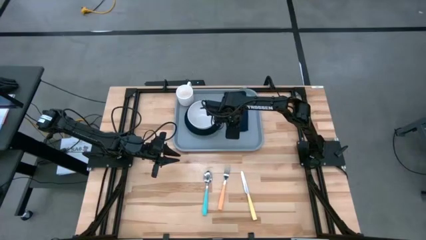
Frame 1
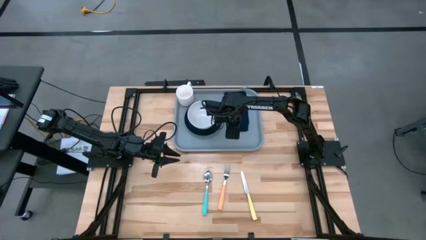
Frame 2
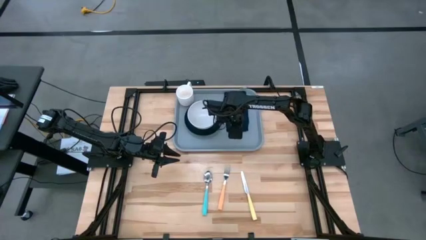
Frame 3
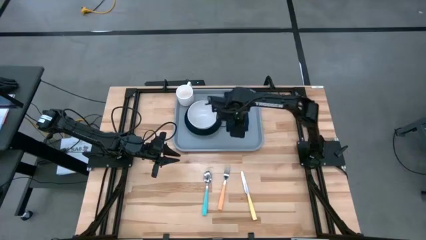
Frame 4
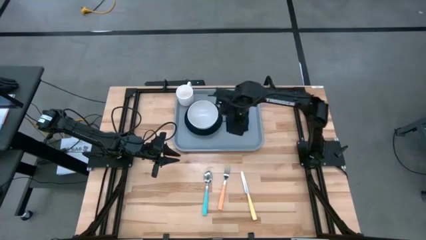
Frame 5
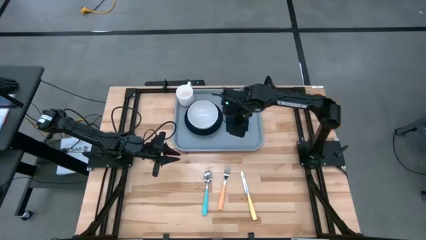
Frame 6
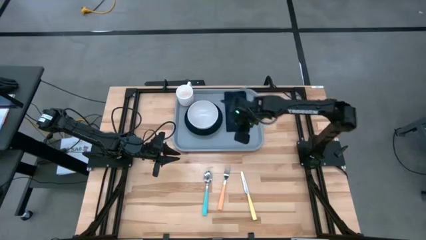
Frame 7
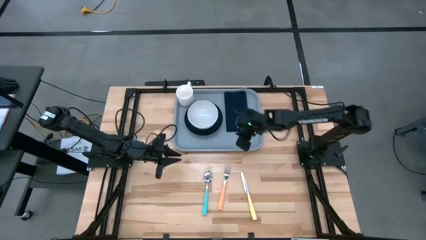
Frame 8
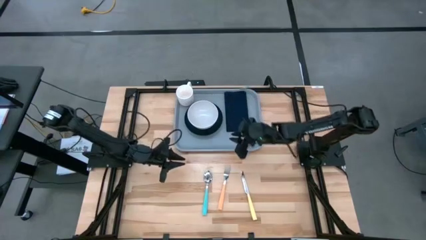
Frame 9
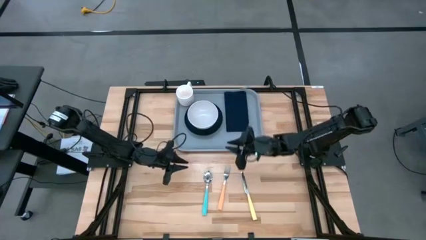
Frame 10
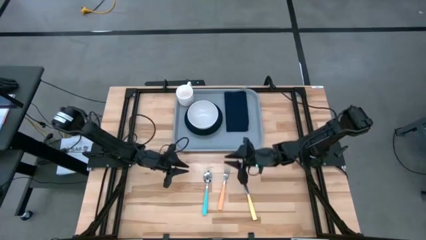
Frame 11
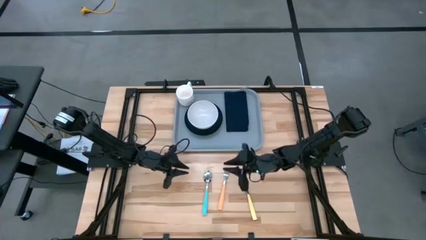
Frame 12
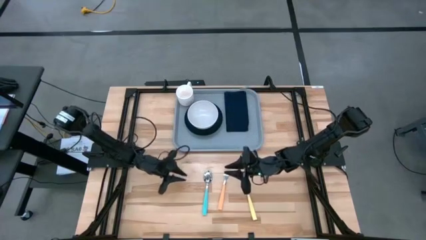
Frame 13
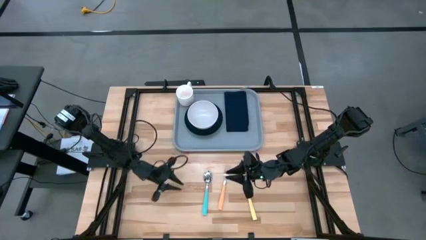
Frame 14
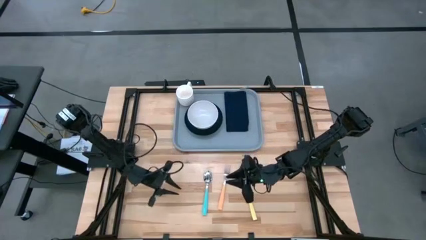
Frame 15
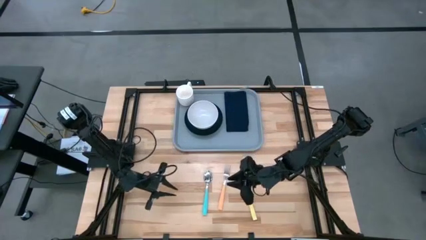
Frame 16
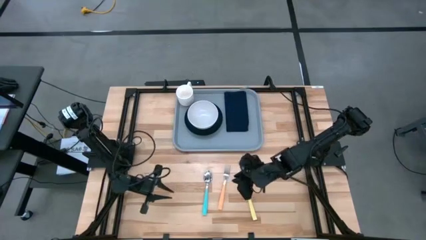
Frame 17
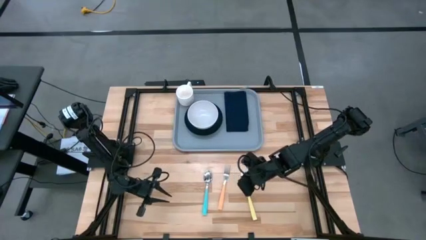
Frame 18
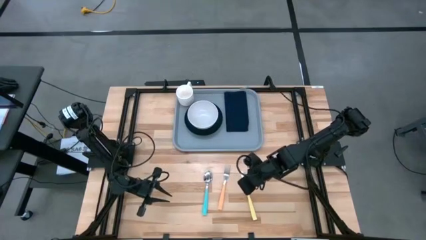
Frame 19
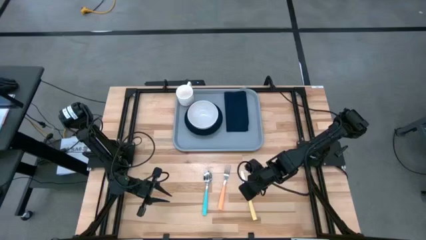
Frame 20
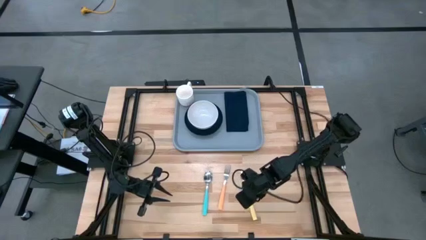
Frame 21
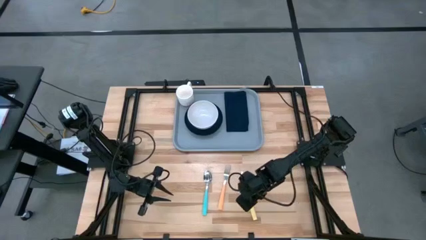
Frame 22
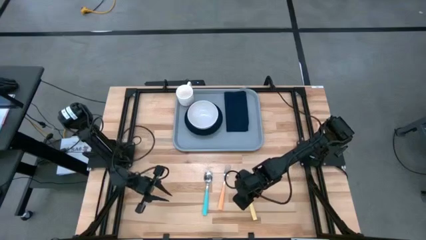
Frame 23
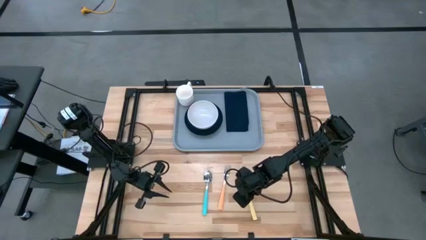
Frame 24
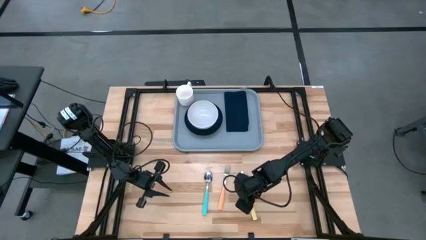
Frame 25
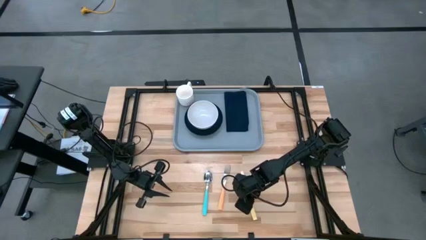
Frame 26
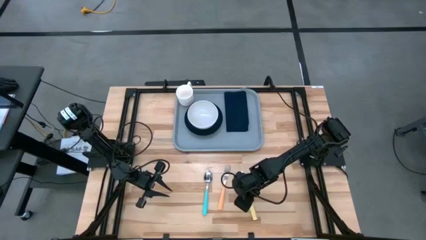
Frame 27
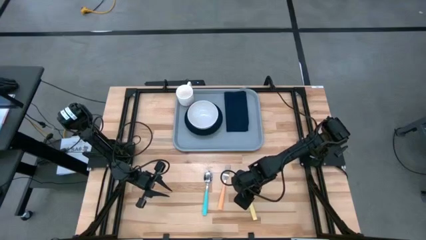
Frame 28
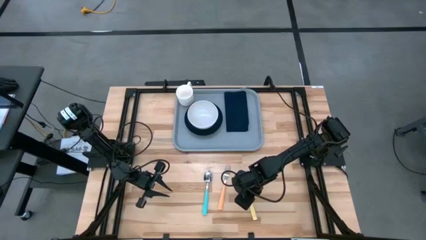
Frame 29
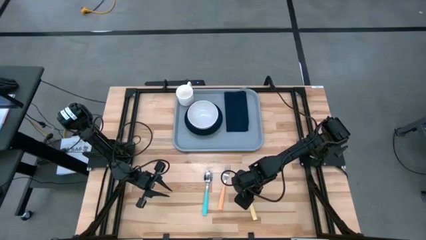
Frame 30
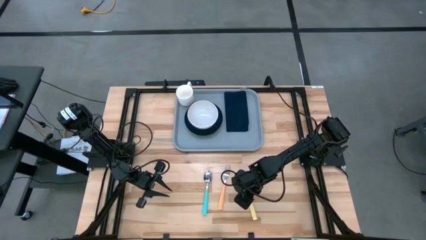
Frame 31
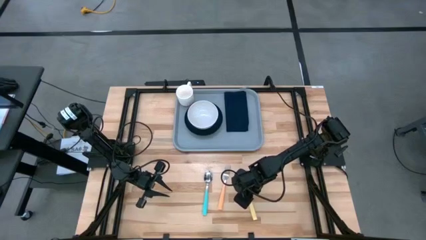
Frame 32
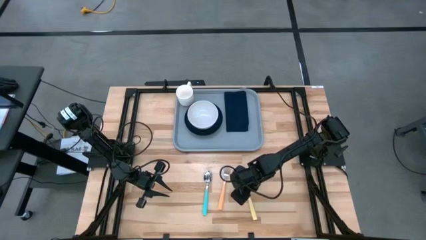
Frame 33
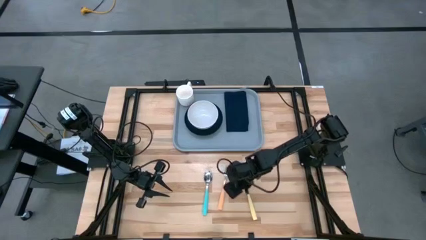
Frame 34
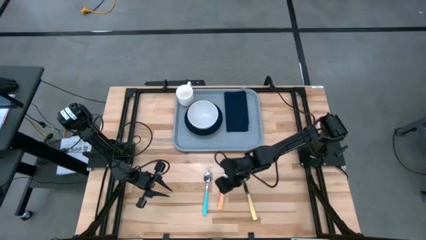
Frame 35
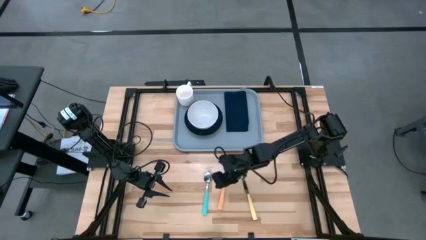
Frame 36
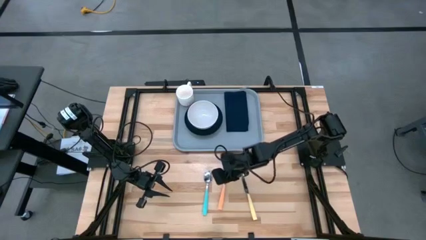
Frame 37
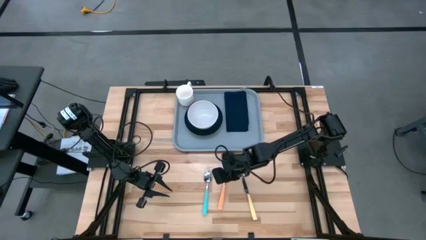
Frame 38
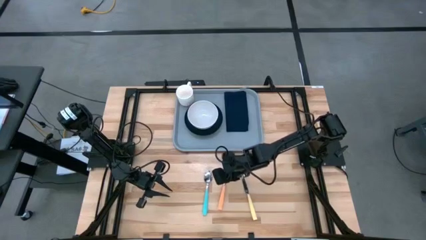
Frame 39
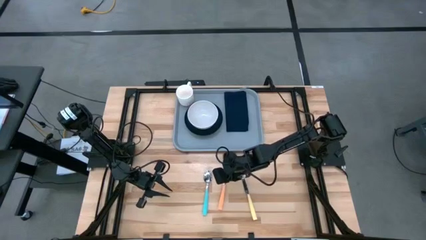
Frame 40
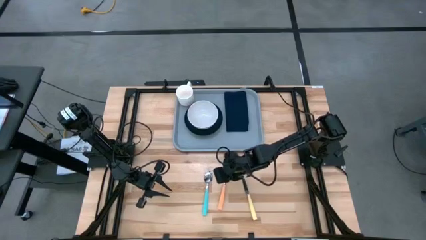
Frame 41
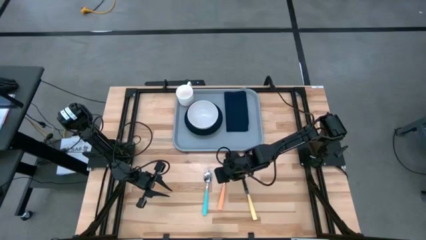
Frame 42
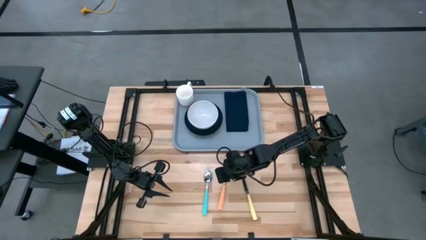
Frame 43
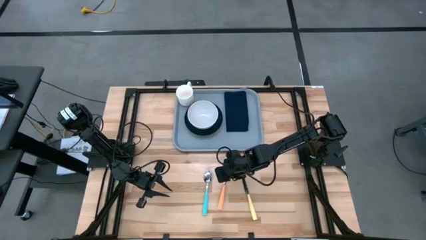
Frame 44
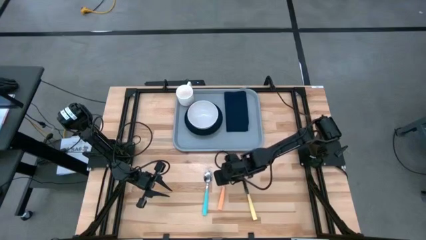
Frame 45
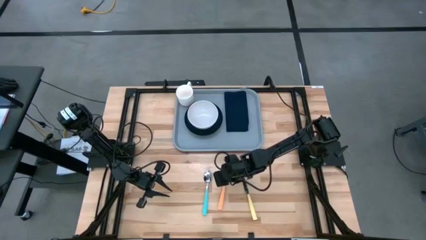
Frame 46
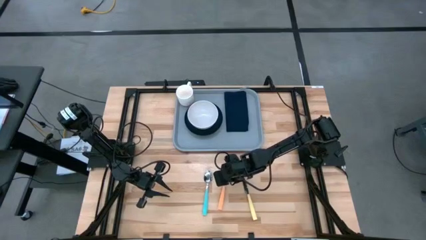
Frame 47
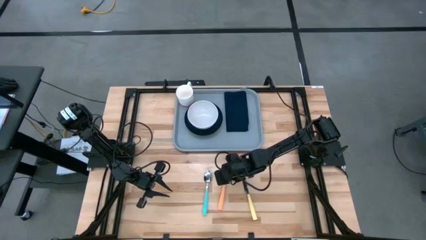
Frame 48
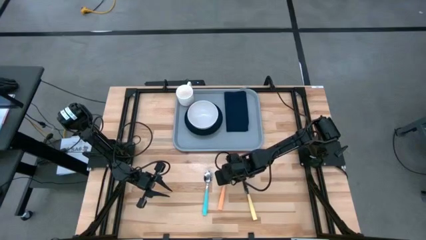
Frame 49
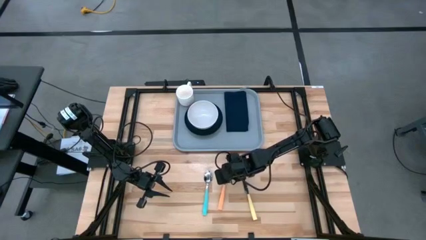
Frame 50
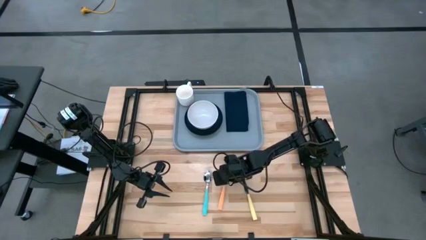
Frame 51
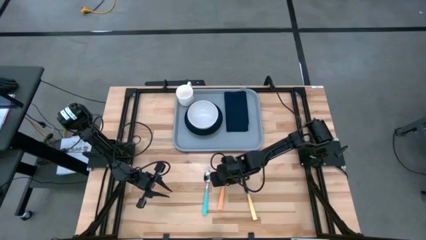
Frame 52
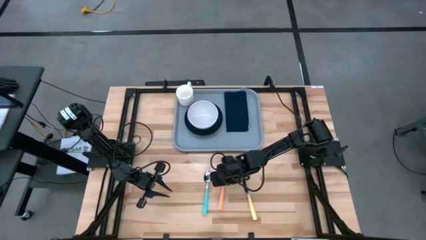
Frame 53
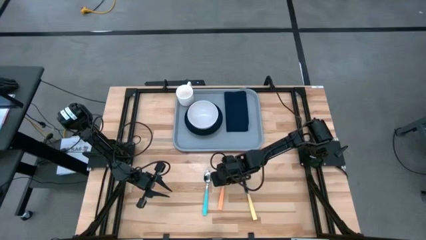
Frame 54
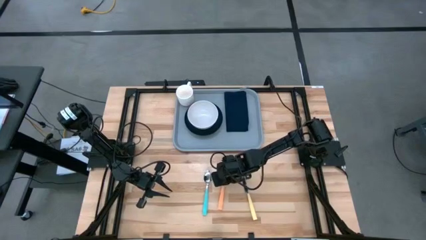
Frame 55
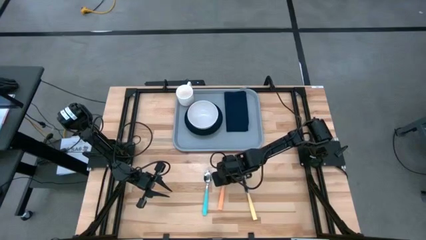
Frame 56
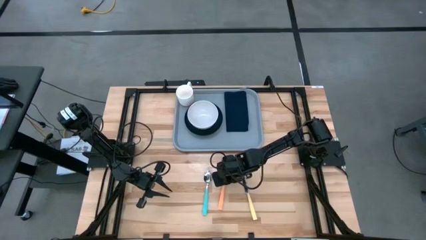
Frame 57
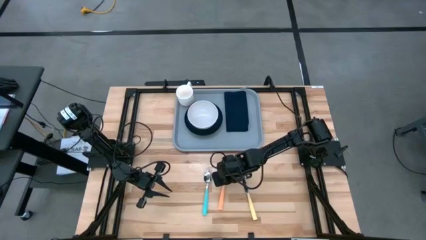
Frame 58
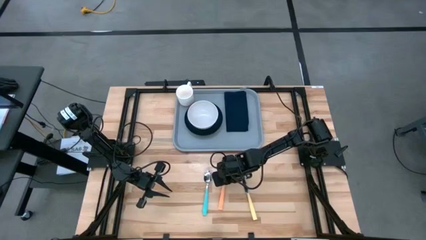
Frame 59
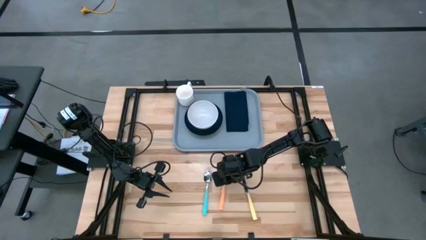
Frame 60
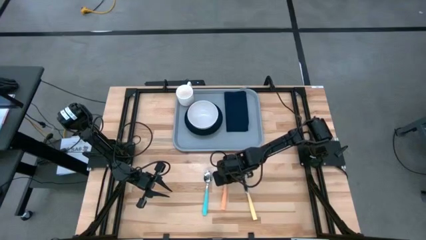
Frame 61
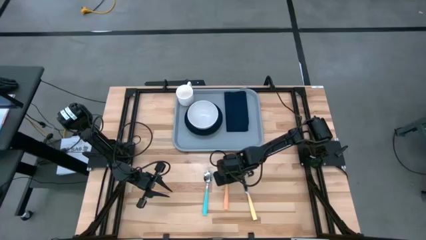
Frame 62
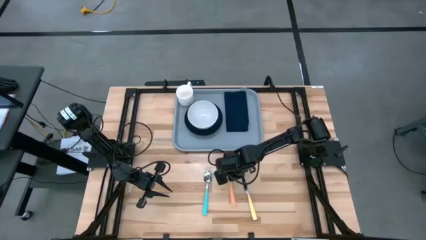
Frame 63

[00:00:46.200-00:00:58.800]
Task: Set up tray
Put the orange fork on the blue napkin to the right of the green plate
